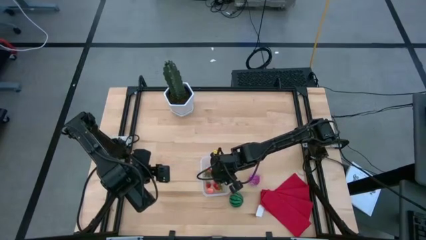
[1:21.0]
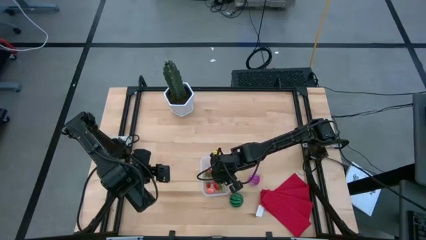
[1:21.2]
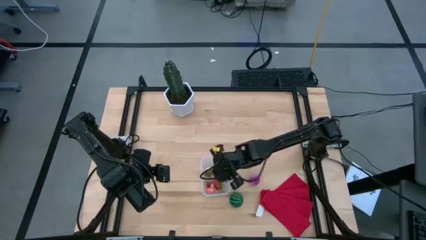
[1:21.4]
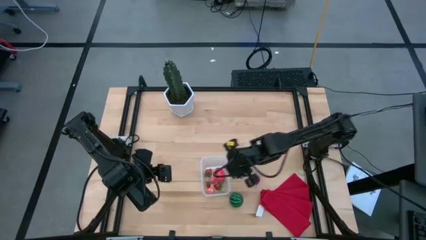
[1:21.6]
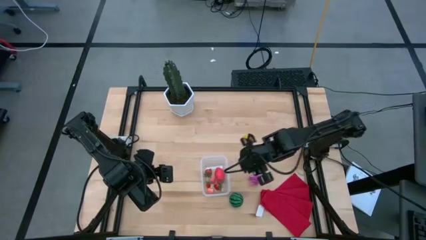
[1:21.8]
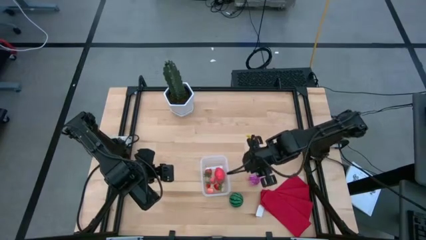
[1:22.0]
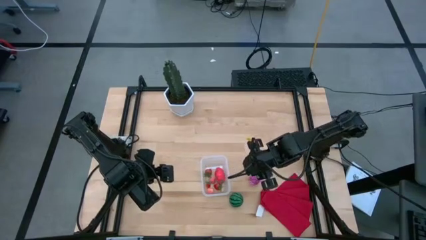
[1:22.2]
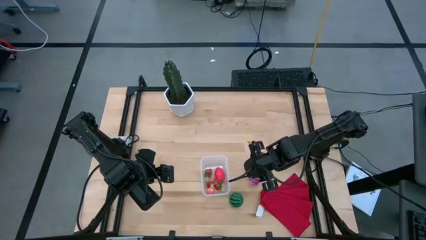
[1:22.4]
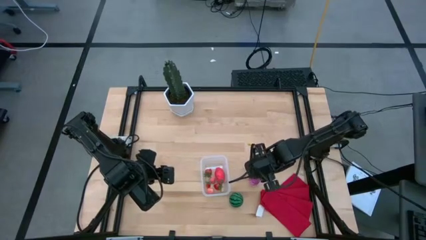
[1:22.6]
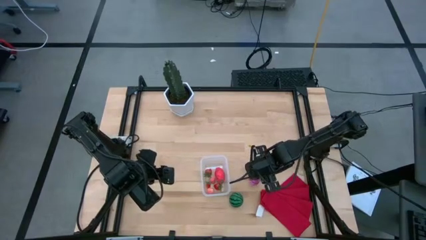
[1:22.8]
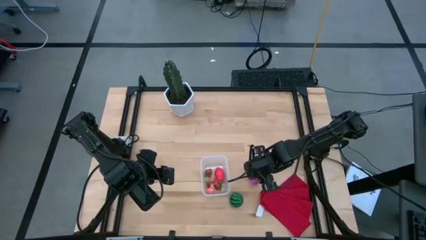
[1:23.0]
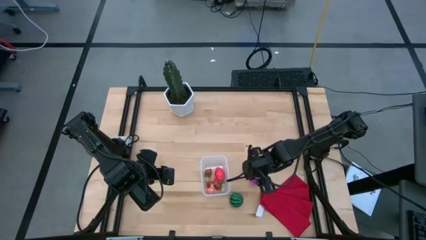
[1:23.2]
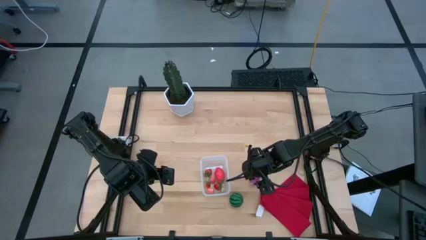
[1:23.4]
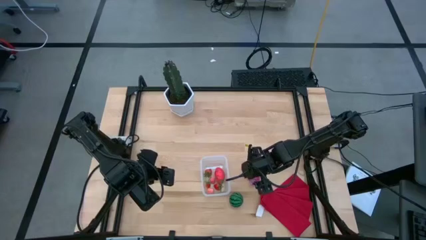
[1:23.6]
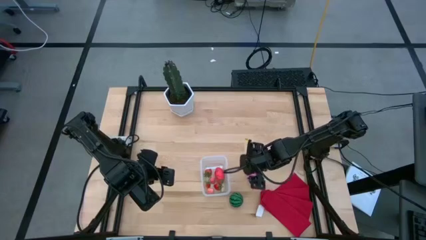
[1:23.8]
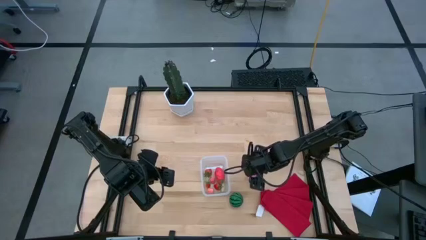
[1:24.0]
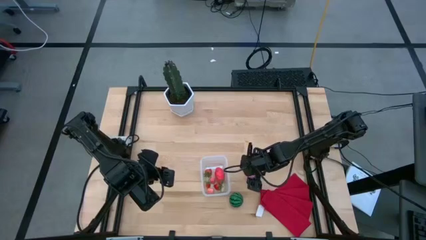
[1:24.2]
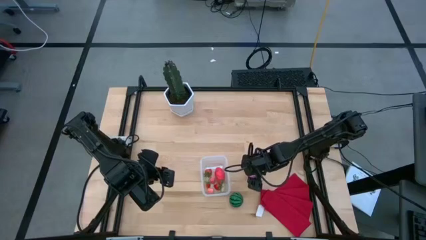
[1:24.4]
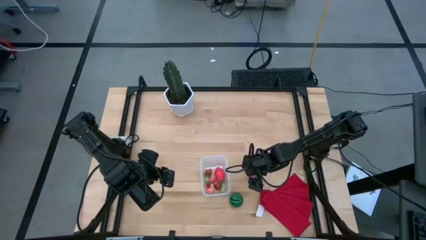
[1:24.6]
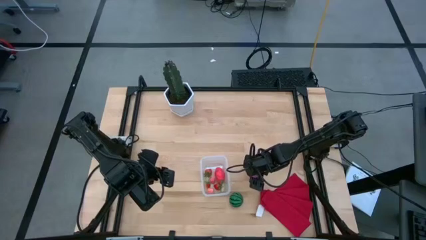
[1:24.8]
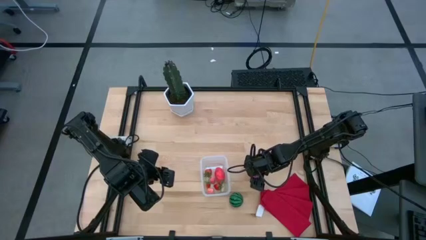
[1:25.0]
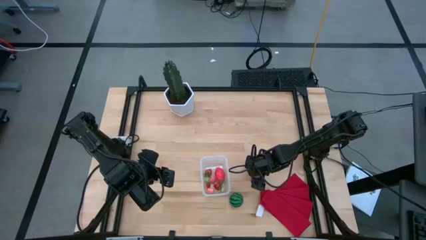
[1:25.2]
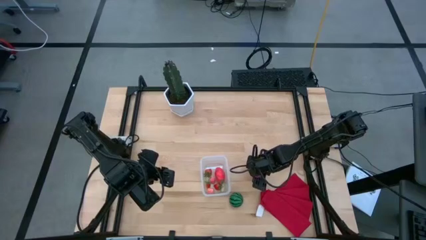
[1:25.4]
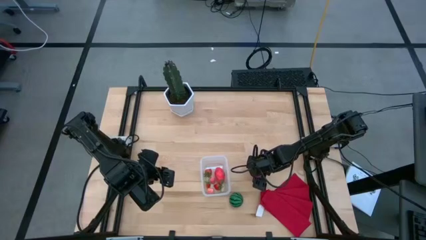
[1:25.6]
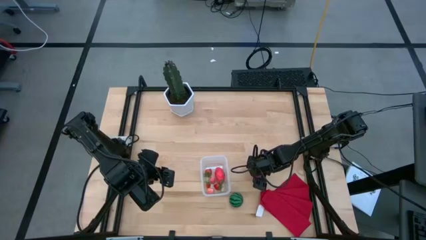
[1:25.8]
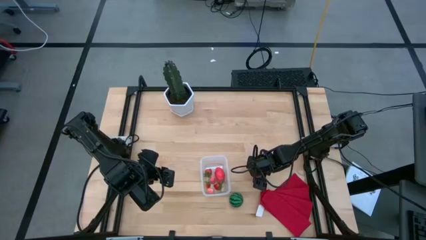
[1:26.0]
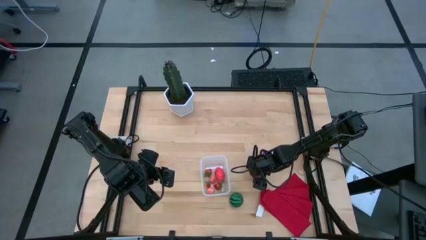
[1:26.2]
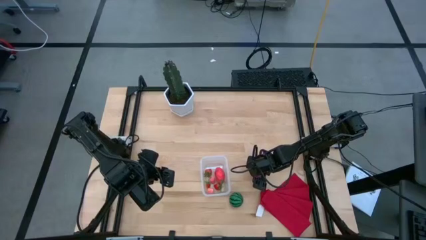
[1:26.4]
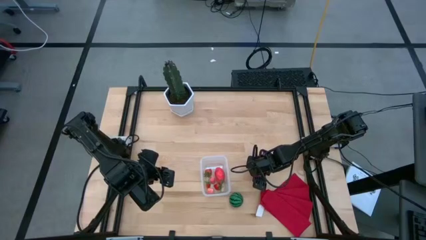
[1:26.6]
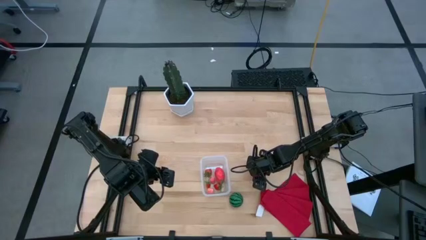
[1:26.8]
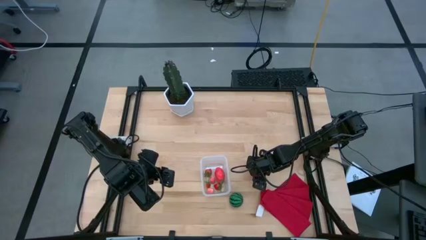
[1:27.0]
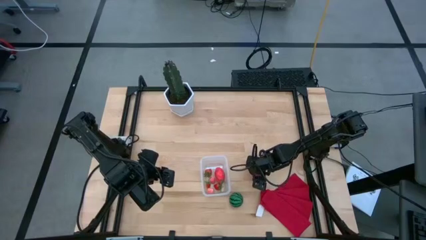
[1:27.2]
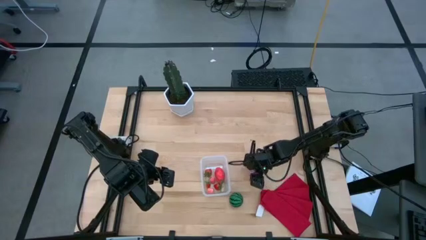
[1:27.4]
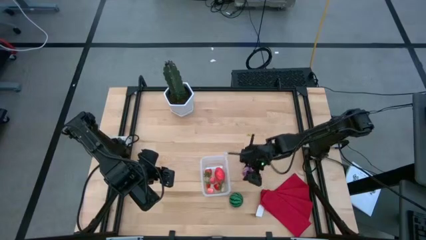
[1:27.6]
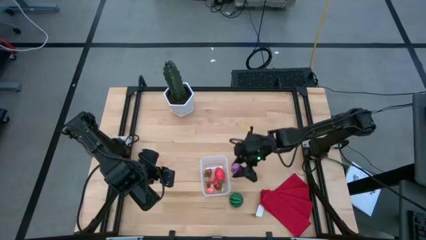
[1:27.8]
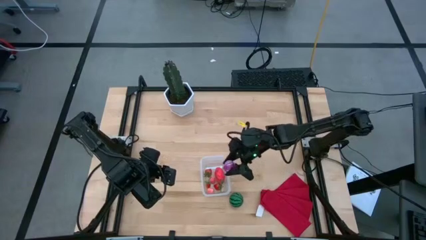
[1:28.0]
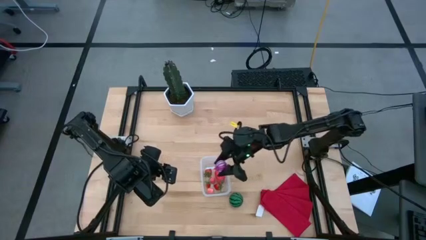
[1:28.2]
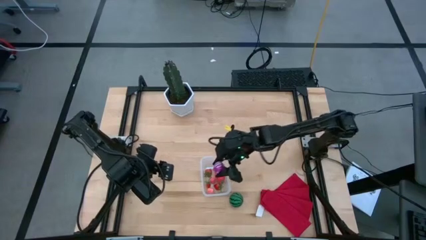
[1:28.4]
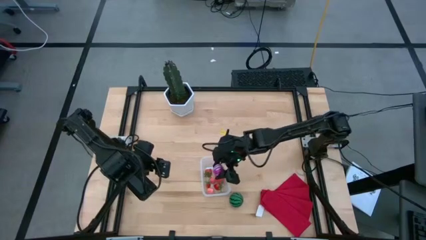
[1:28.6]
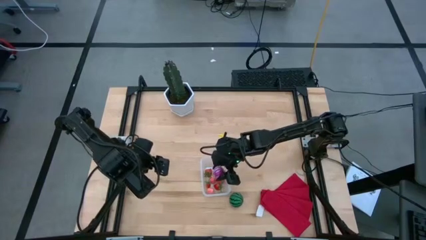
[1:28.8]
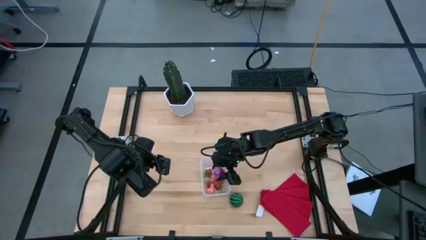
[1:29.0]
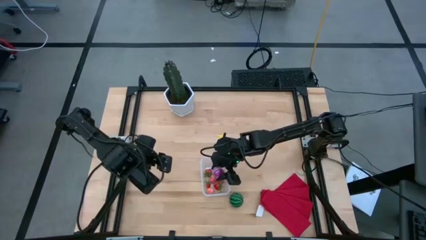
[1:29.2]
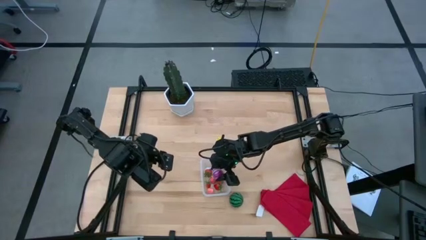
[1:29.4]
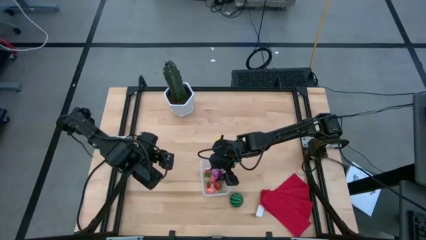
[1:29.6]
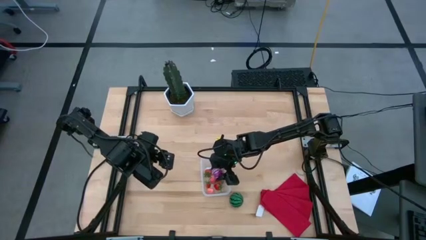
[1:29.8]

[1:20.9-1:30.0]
Task: Pick and placing Produce into tupperware
Put the onion into the transparent bin

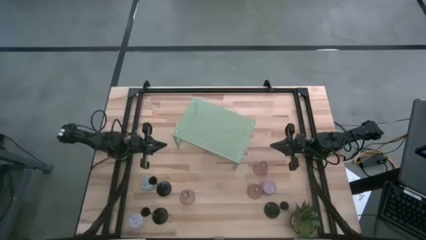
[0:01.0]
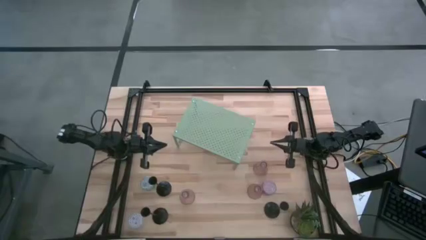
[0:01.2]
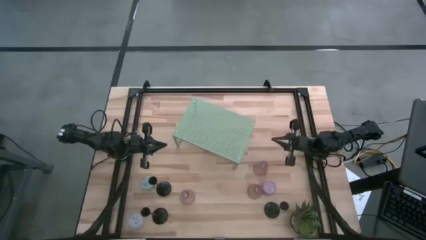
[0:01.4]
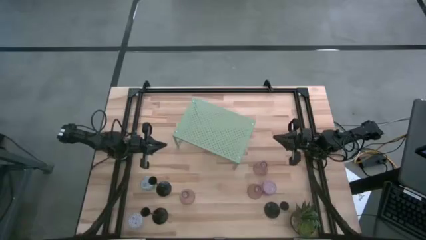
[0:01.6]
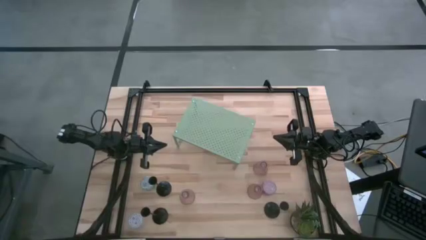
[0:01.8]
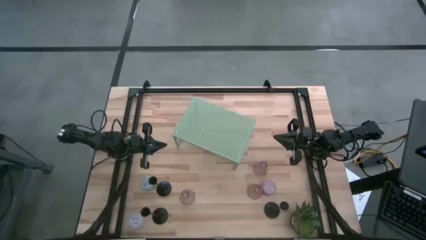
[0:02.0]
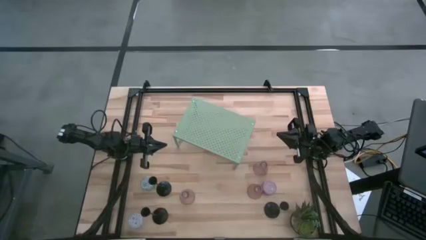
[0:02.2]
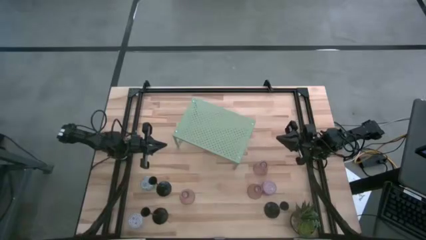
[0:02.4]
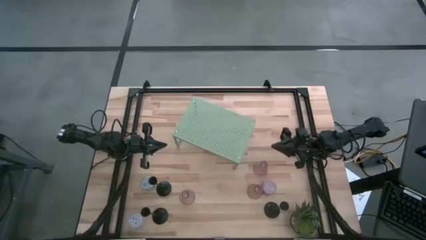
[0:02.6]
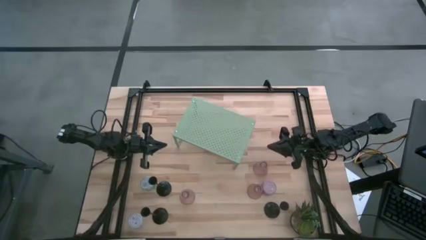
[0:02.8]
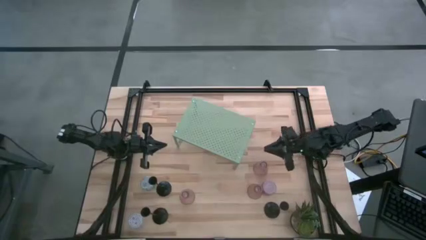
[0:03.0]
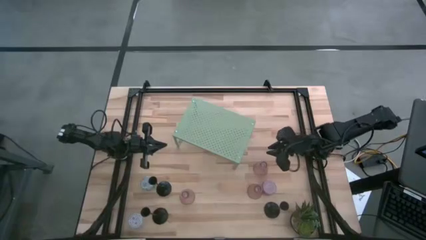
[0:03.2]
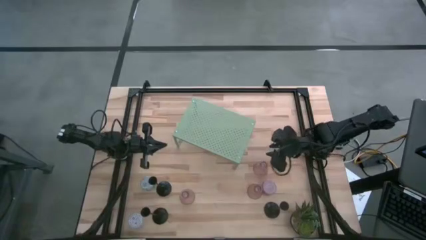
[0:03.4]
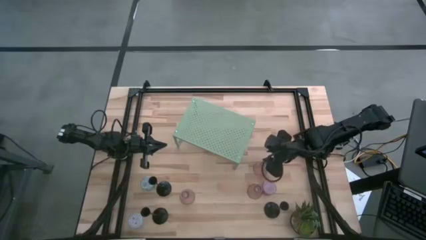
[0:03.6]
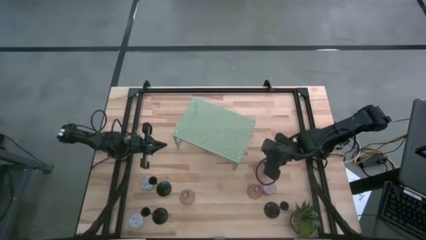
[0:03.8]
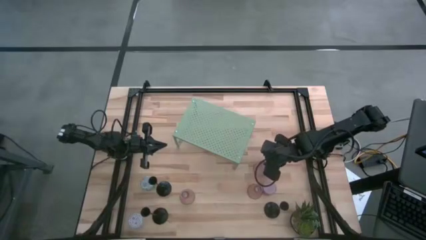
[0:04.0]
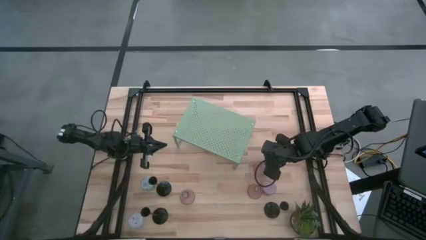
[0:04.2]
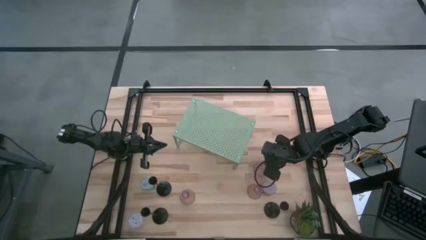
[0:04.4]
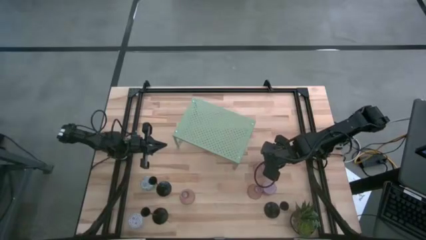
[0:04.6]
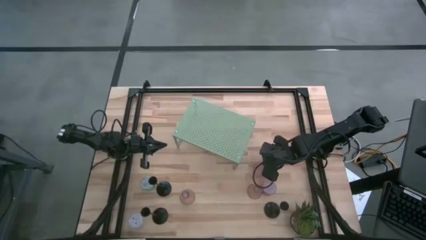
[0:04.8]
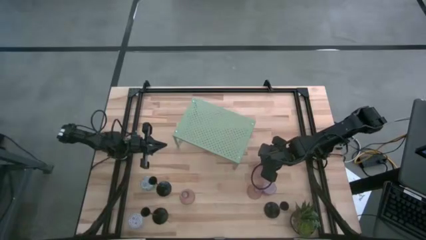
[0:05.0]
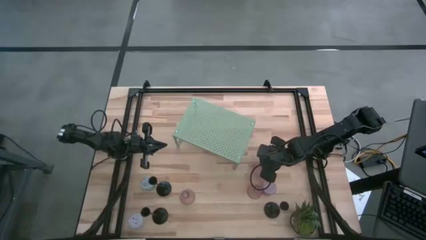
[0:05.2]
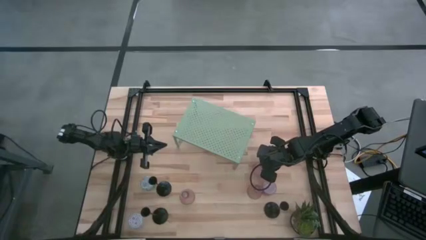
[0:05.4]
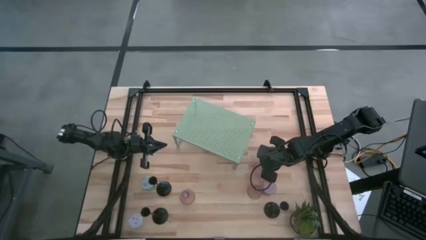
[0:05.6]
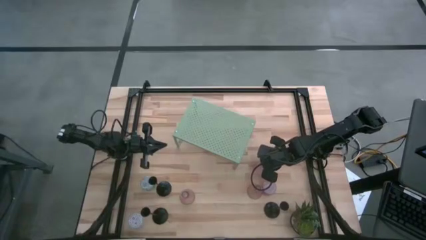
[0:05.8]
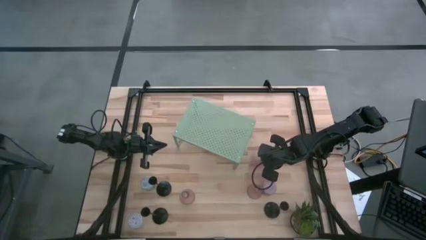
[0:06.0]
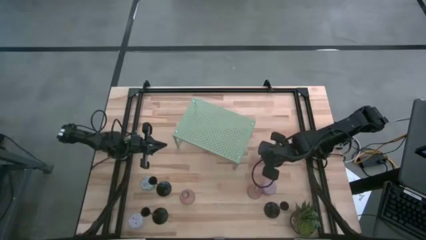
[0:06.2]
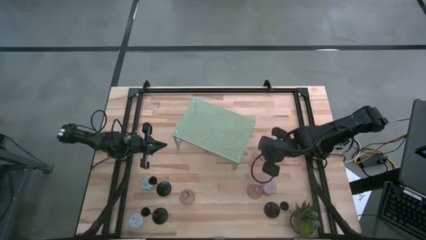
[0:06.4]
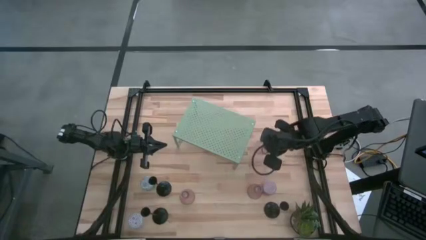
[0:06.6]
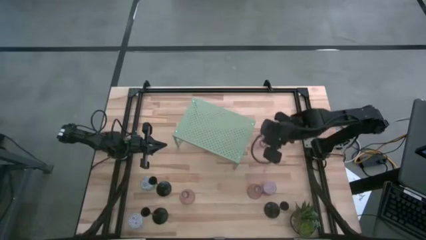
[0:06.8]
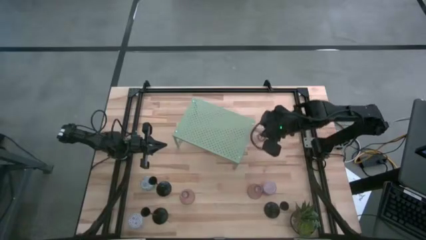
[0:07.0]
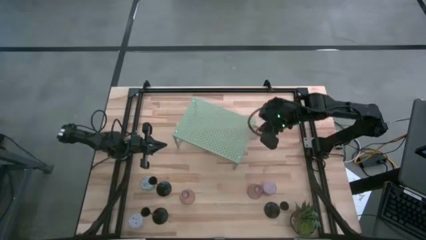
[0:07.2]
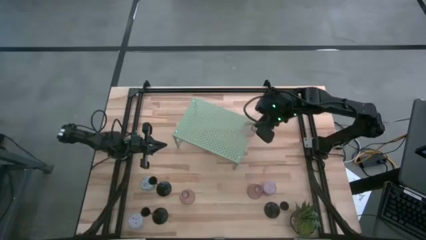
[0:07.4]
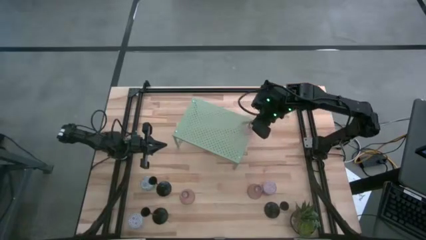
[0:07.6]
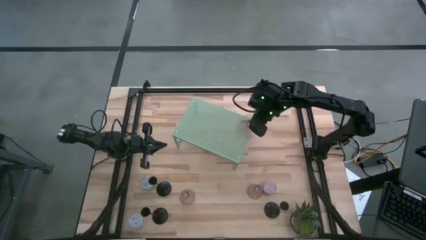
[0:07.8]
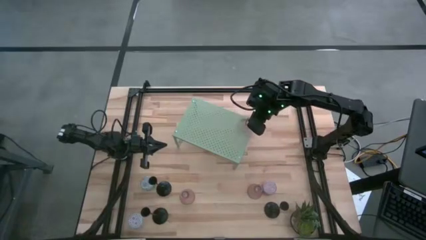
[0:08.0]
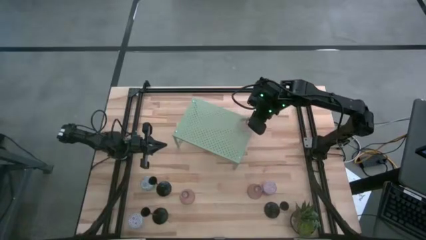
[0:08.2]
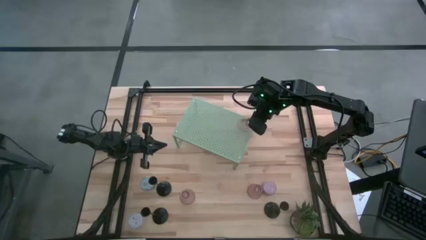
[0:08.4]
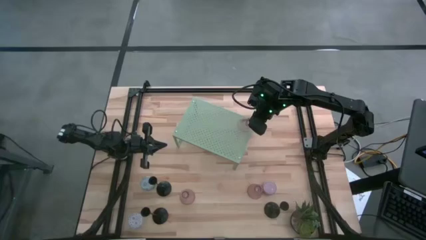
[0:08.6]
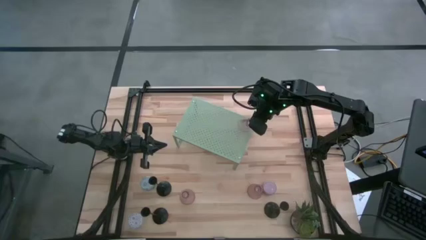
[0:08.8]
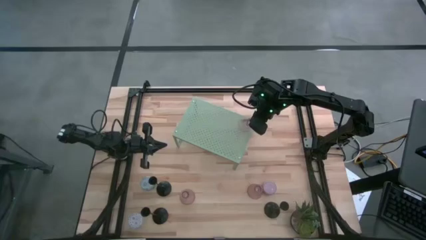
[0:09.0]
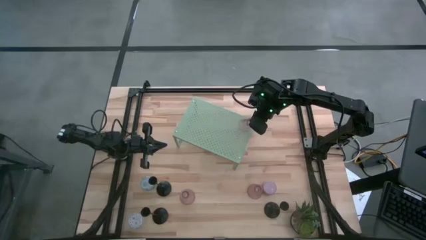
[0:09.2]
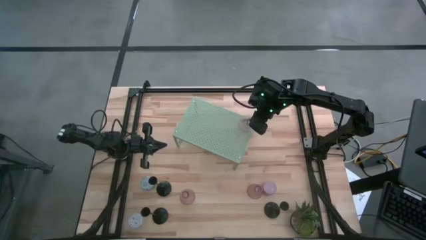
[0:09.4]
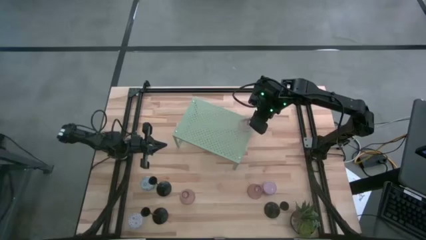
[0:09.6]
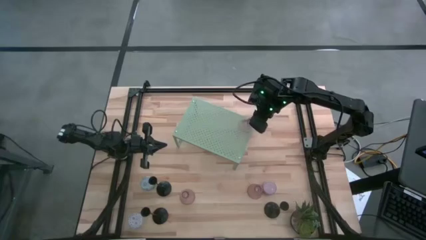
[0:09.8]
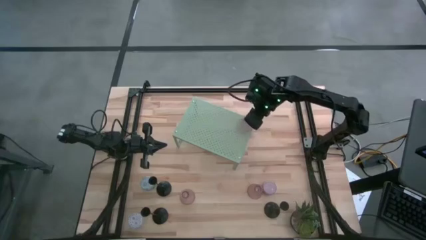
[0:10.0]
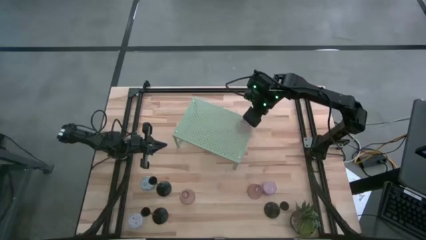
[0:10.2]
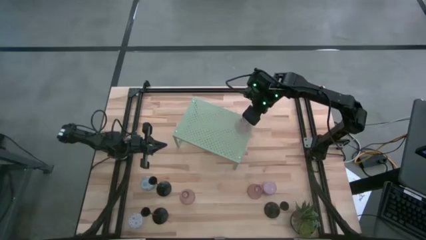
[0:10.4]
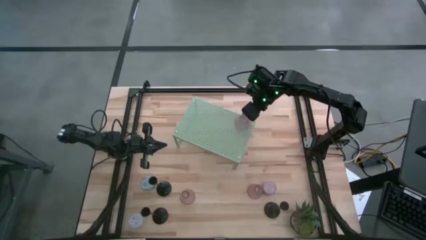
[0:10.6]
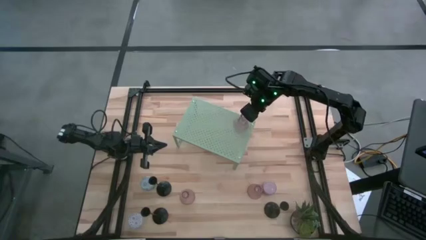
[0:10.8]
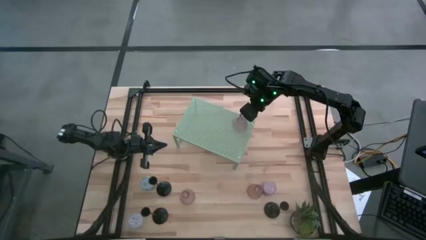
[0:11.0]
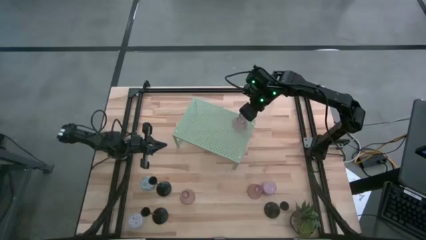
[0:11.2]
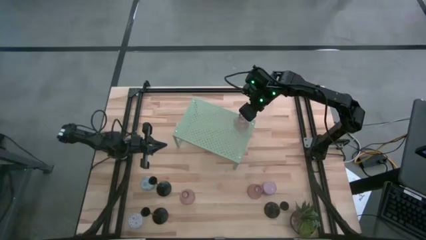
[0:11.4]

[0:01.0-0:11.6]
Task: Pick & Place candle stick holders
Put the top purple candle holder on the shelf
